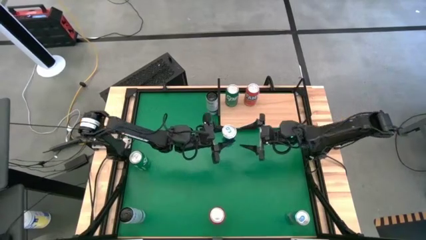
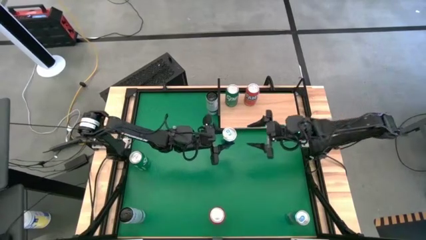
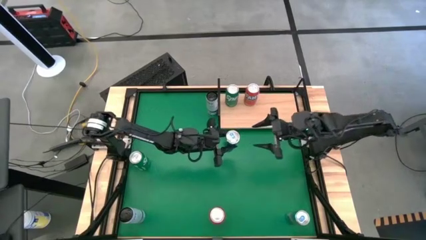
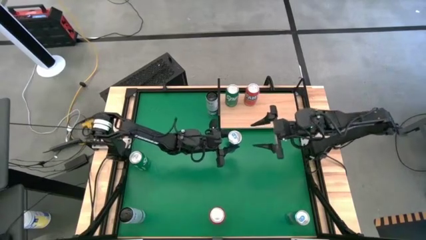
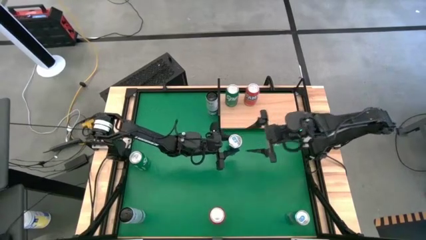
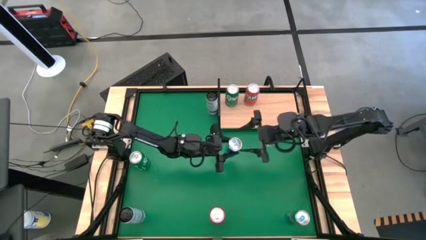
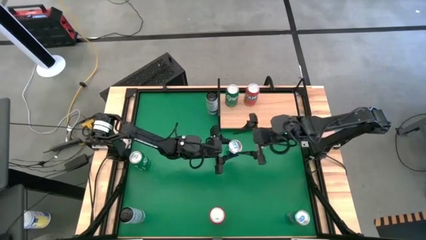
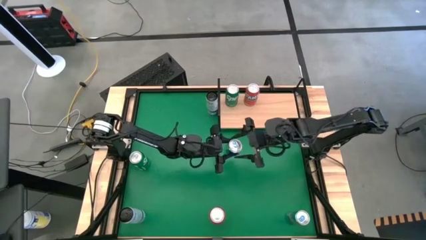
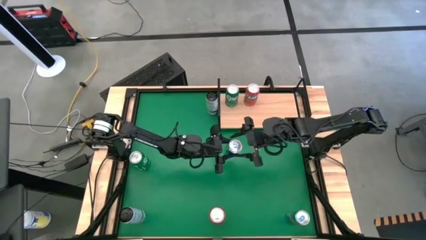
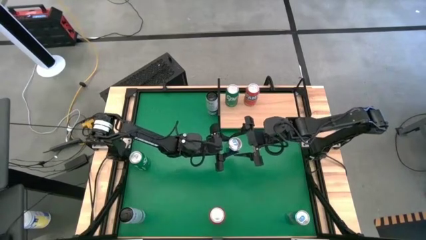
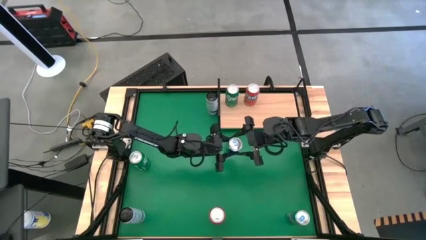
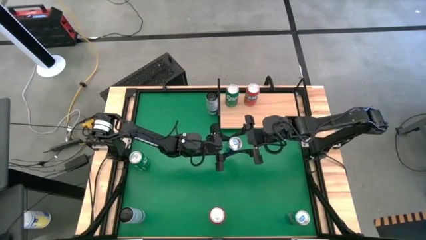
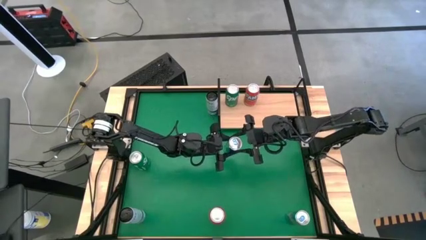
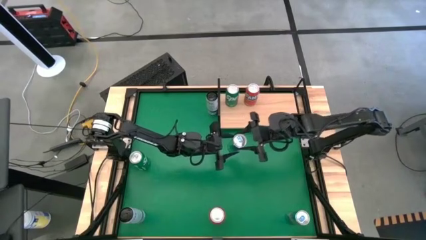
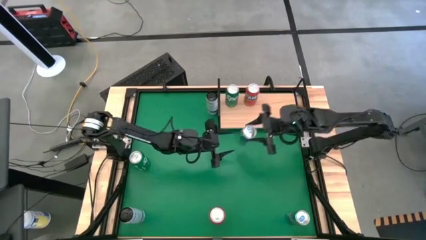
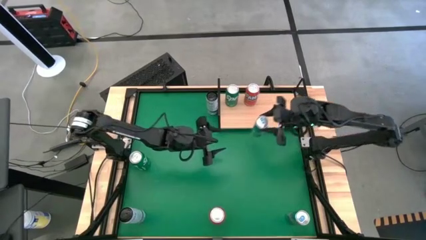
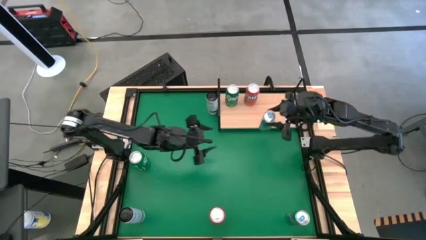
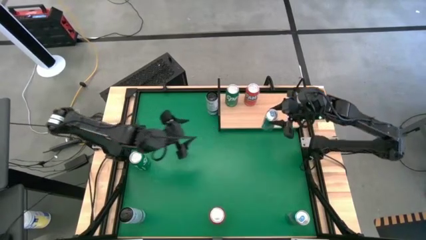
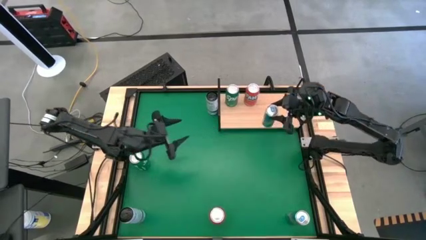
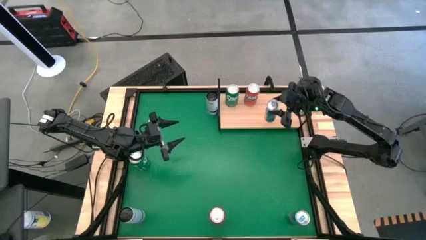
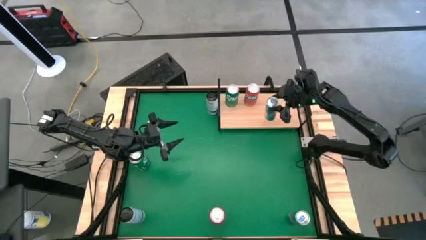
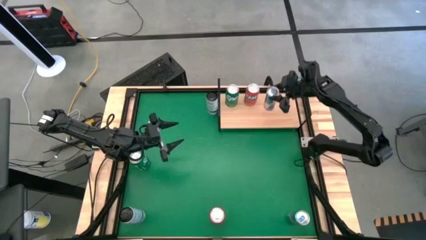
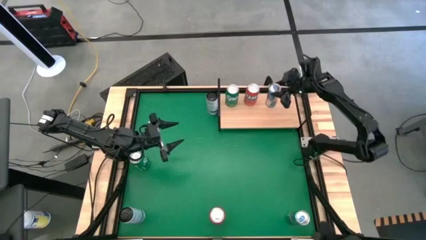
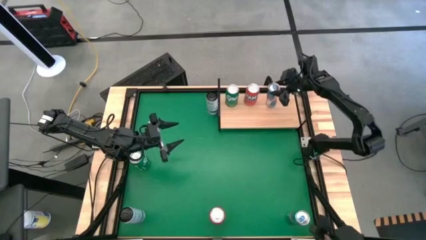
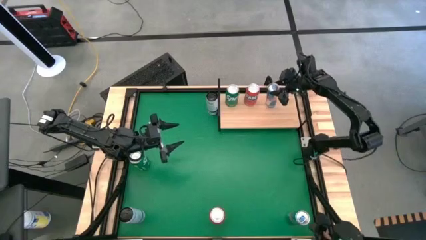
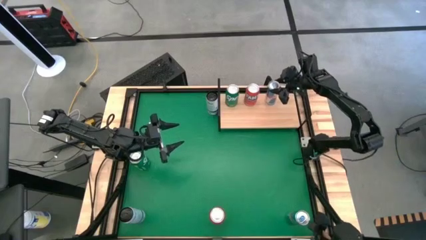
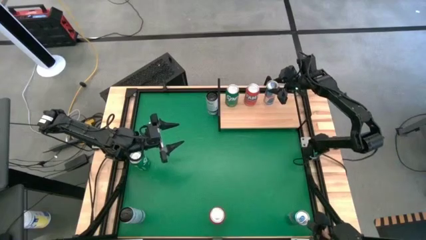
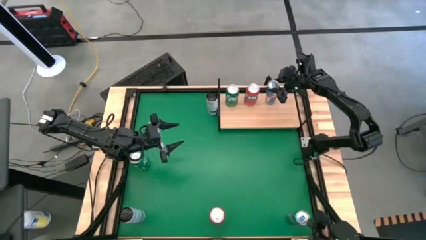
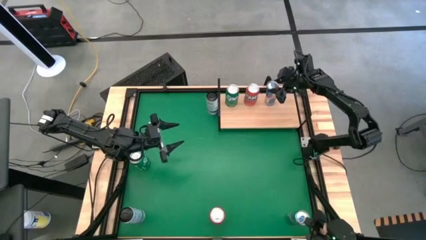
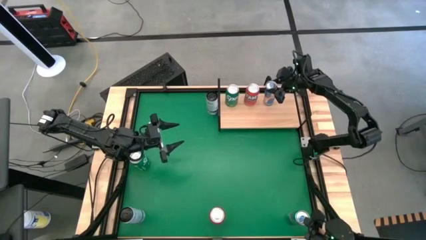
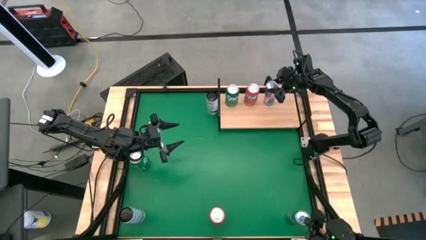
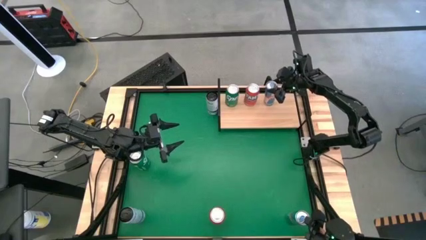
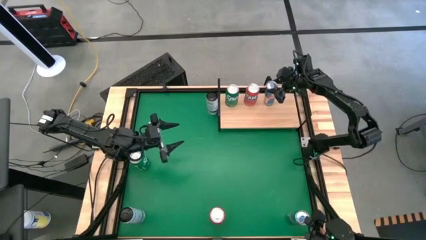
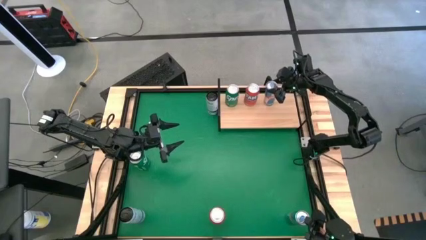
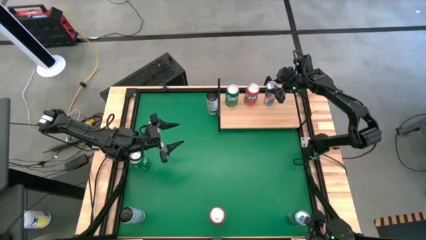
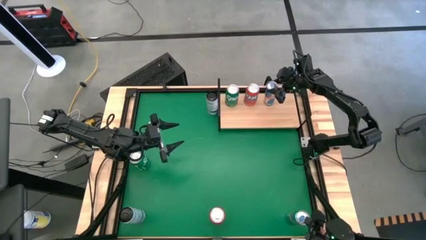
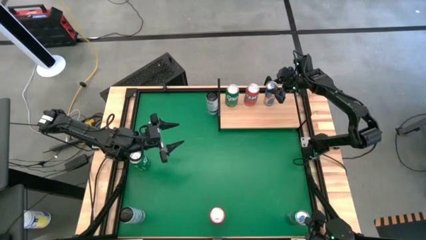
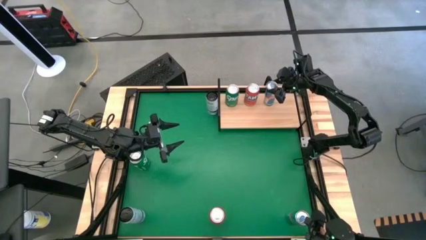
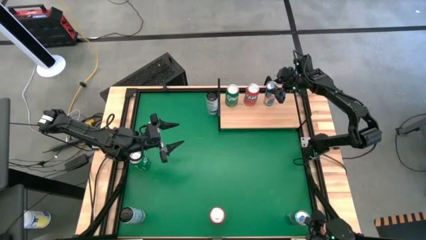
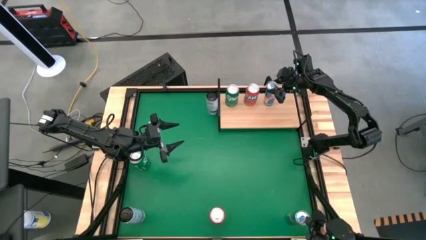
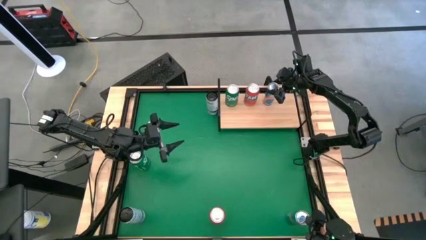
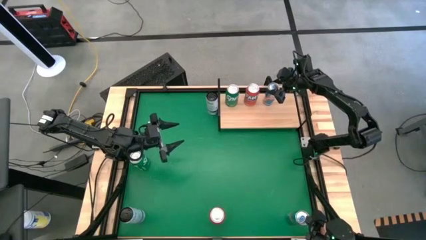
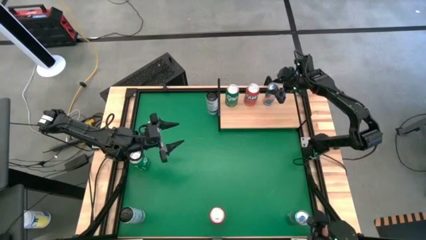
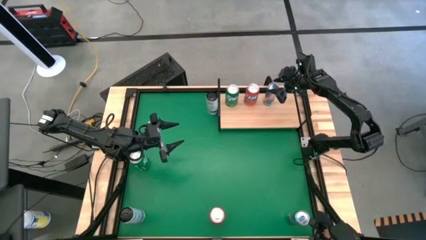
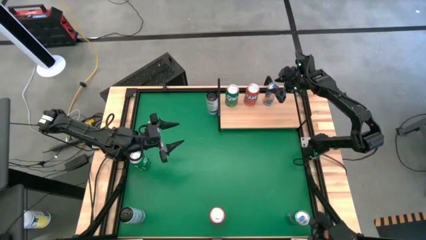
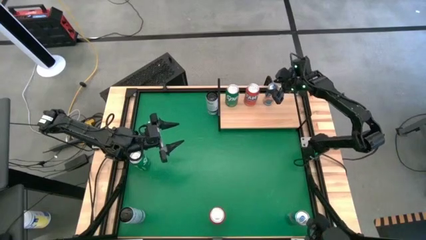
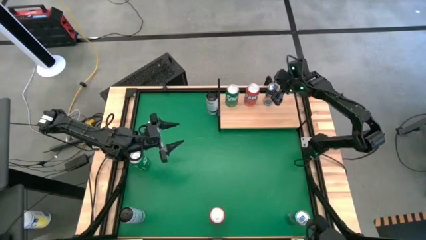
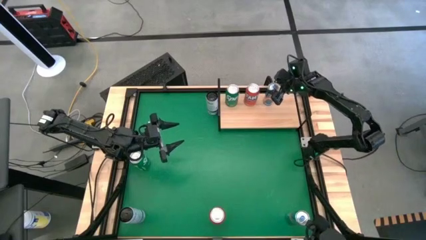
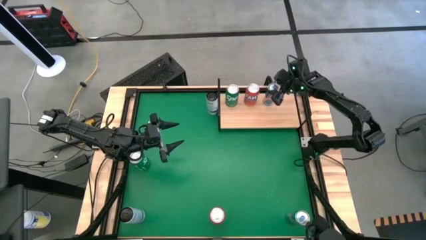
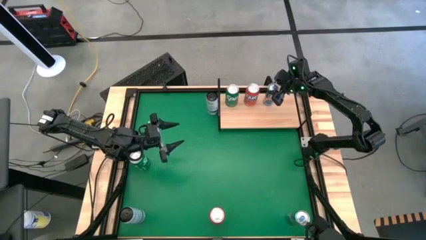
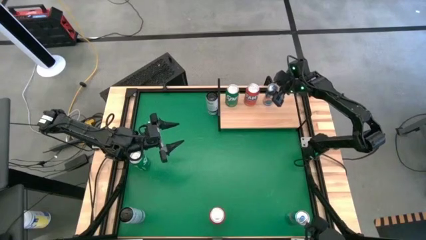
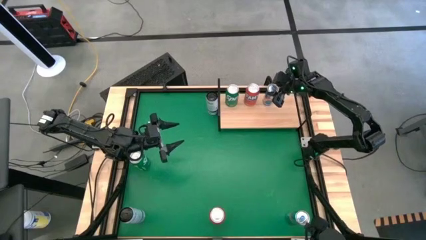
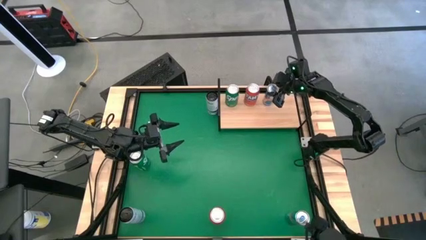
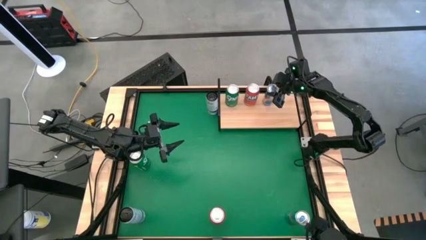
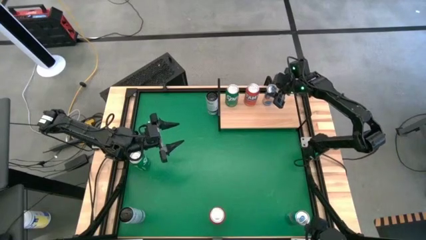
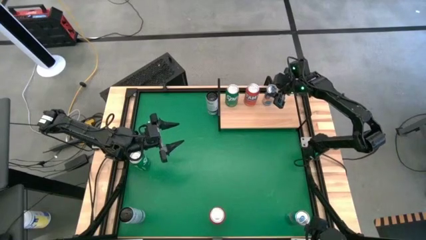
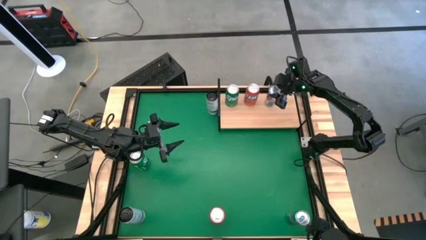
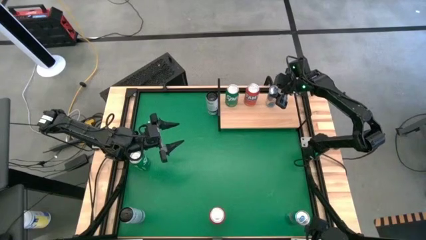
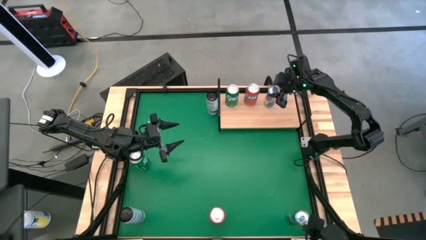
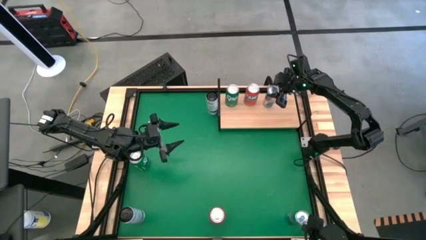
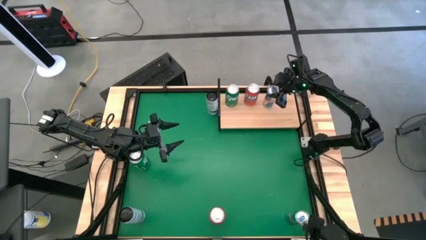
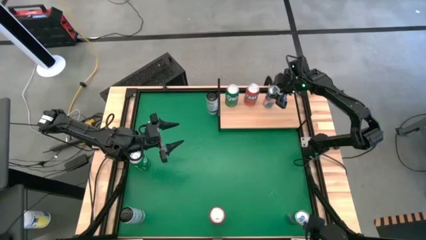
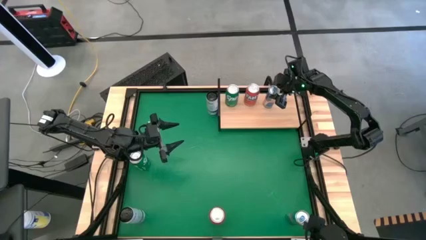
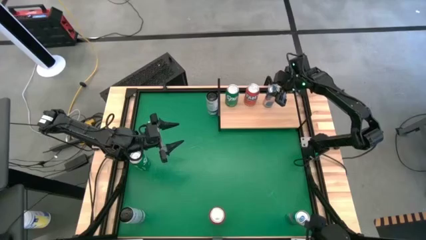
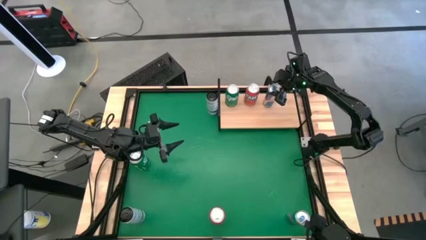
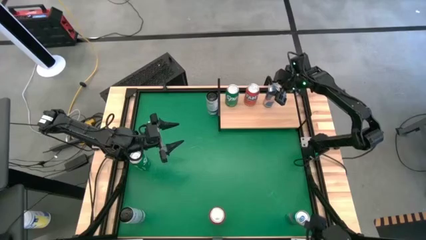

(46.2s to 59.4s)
Task: Place canned beverage on shelf
Put the top blue soda can on the shelf
